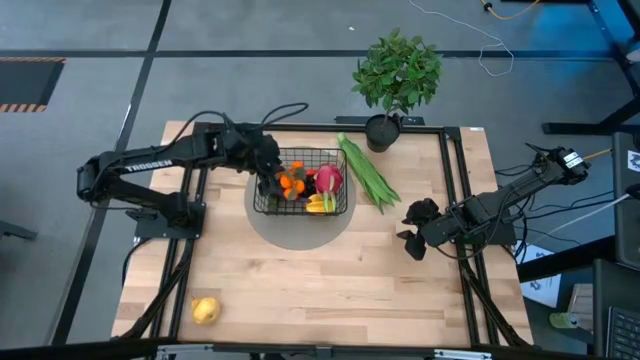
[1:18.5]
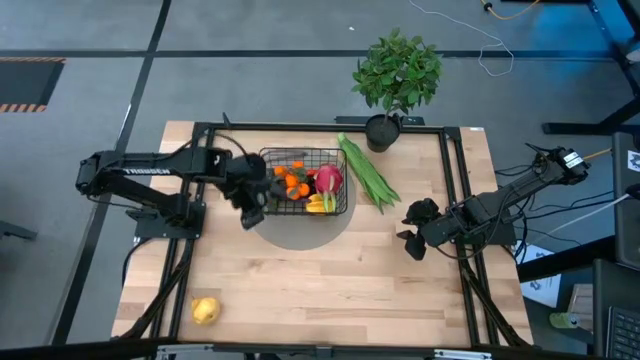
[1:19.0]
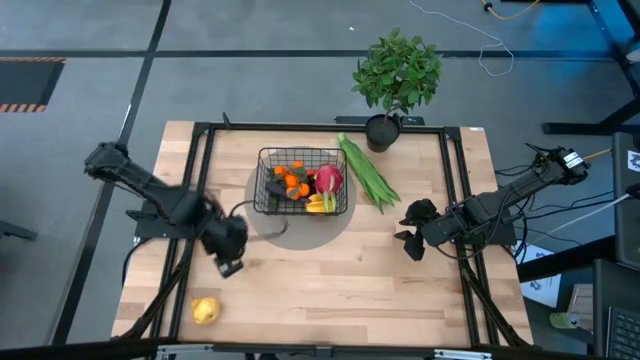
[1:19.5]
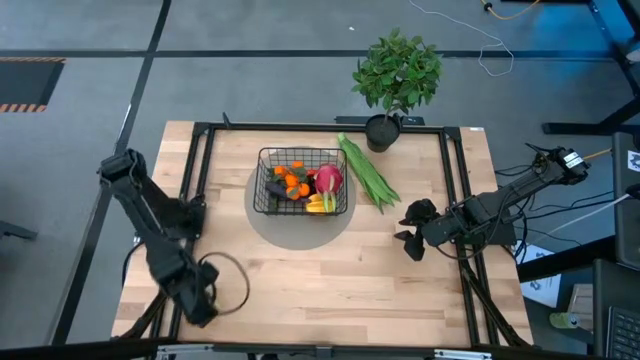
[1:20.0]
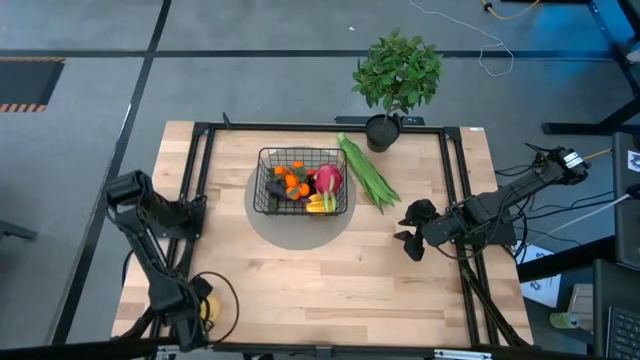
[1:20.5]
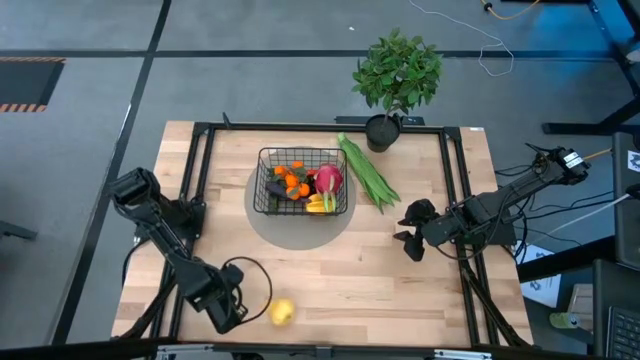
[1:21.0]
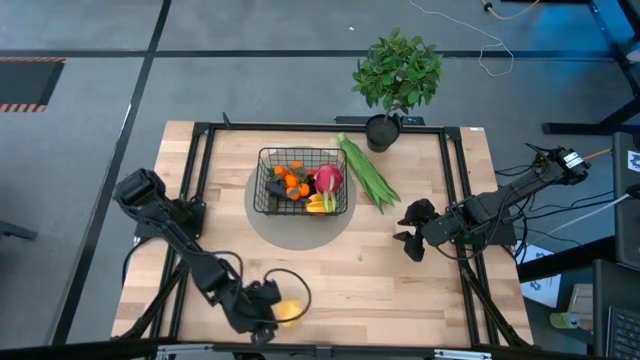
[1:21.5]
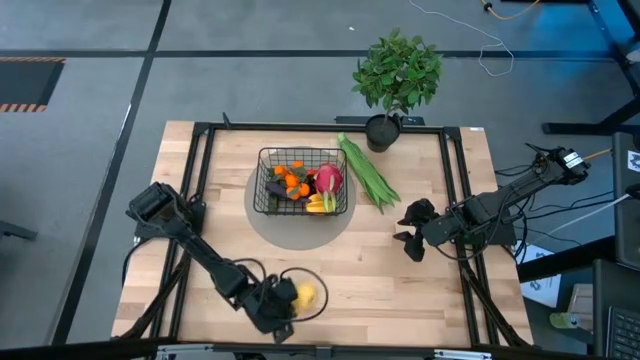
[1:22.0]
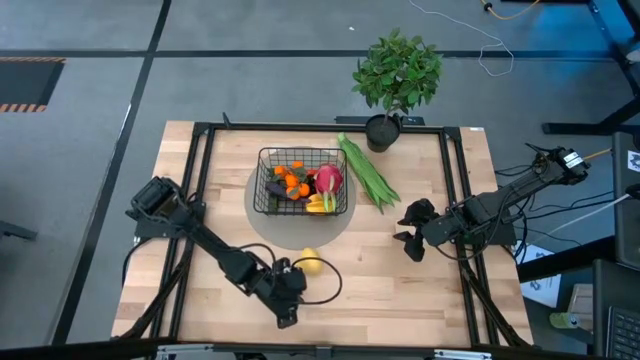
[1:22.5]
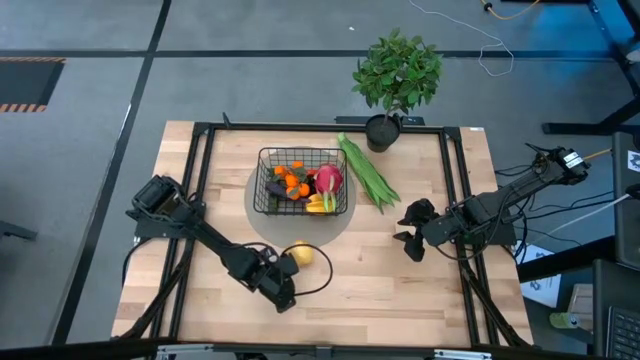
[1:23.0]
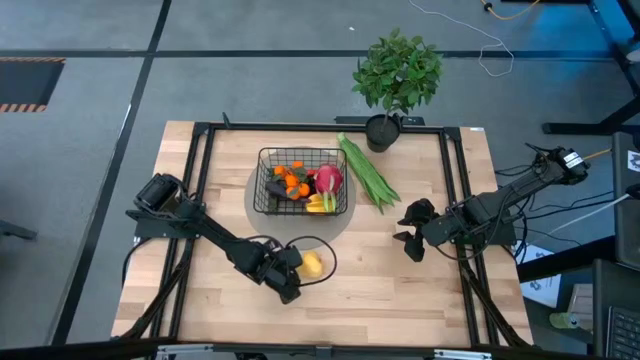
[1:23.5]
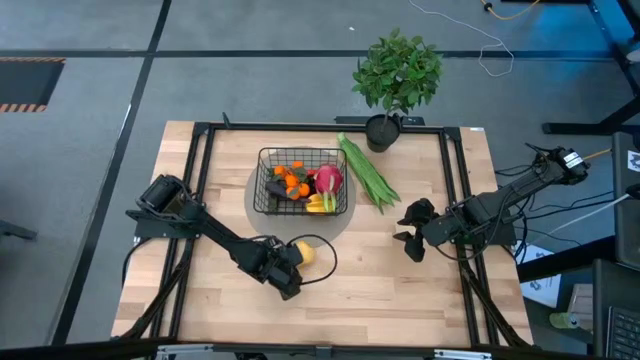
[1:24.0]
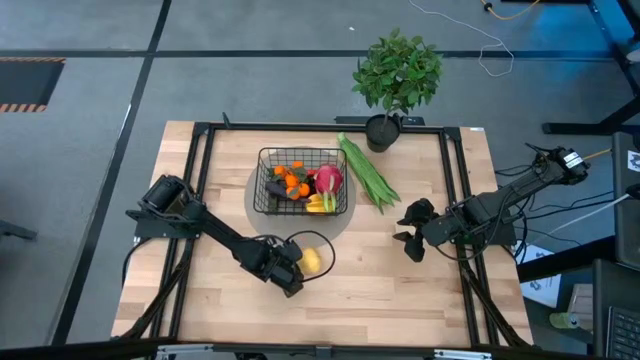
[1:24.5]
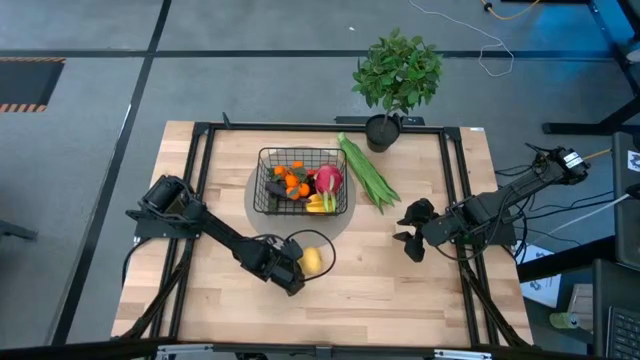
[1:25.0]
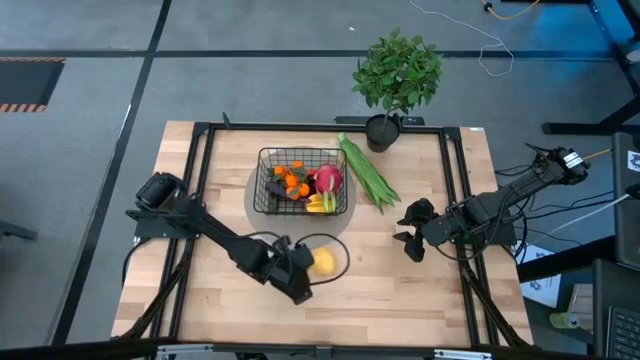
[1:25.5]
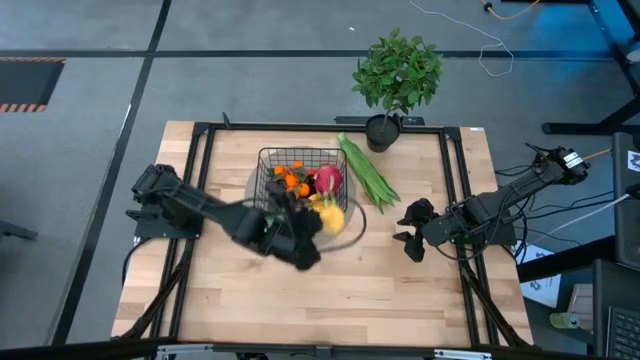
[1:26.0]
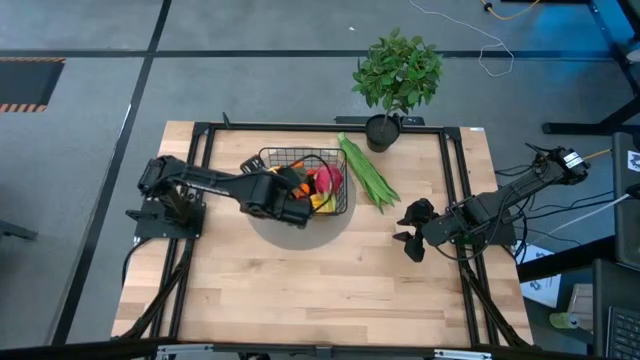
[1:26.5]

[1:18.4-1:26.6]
Task: Build produce basket
Put the yellow pear into the black wire basket

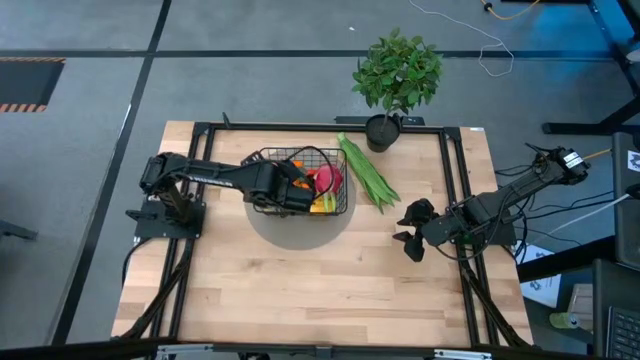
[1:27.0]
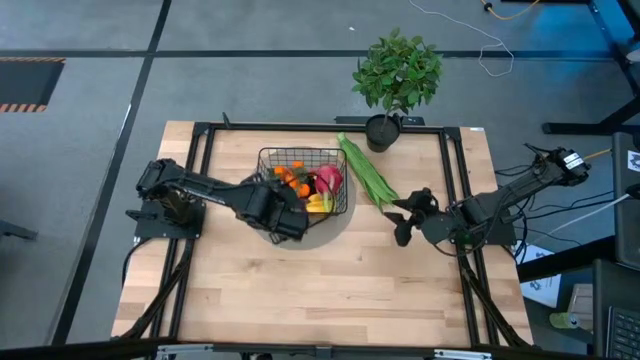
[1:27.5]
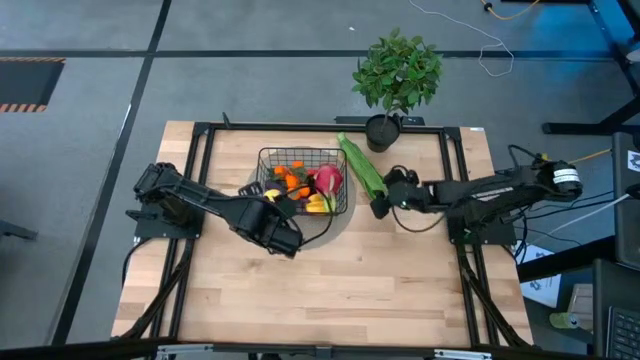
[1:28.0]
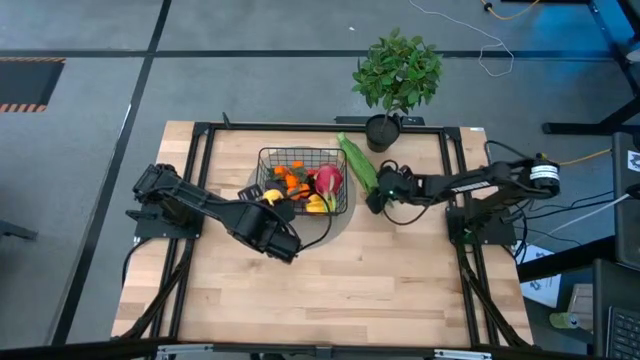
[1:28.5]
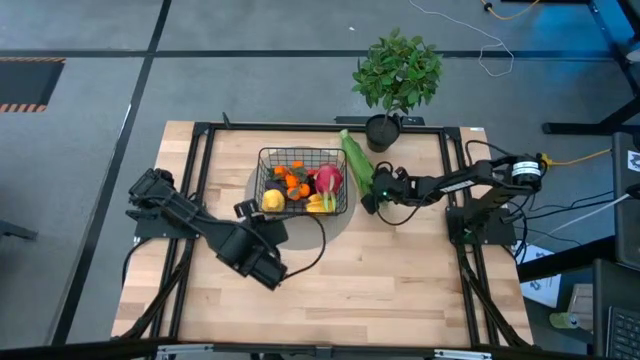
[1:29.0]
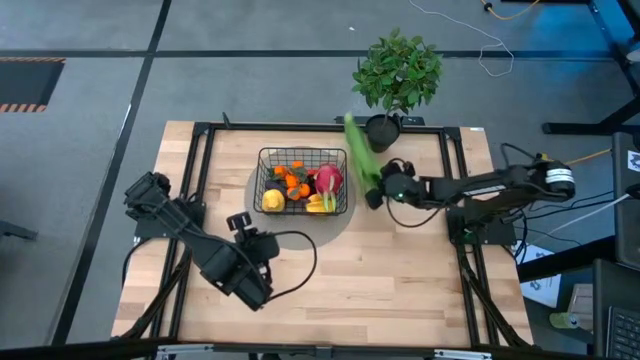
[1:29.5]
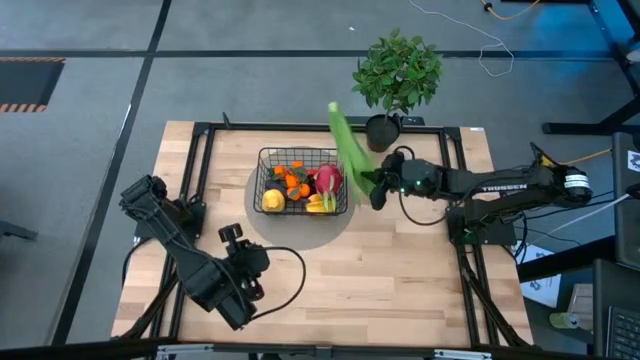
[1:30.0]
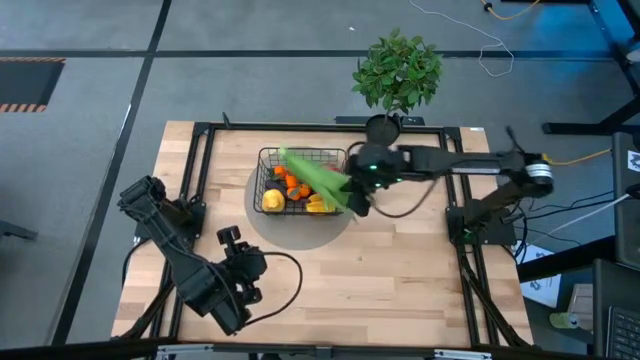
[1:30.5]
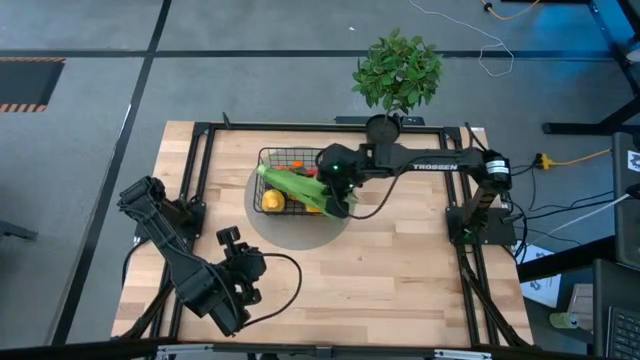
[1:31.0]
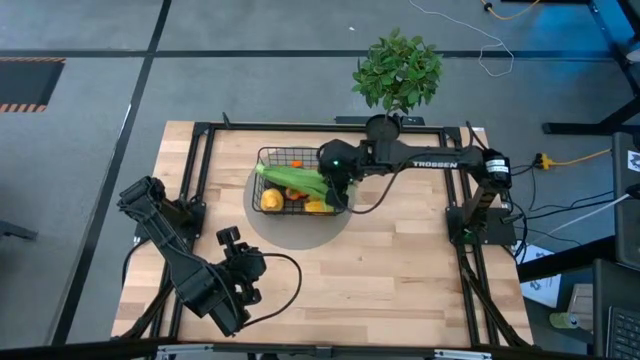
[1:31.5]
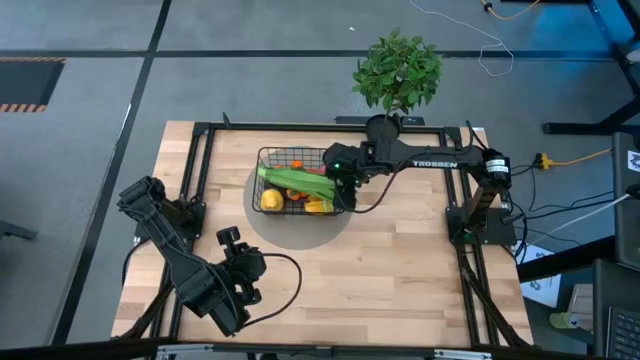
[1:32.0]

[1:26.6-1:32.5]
Put the green leaf lettuce into the black wire basket

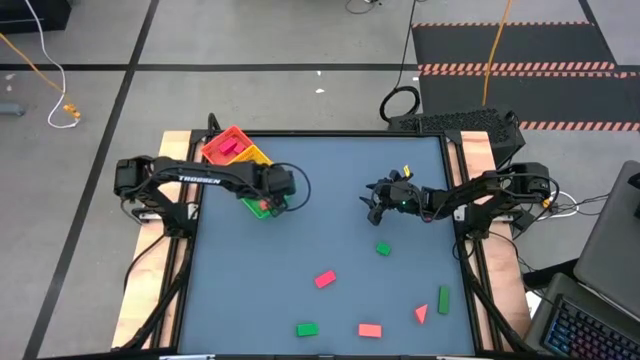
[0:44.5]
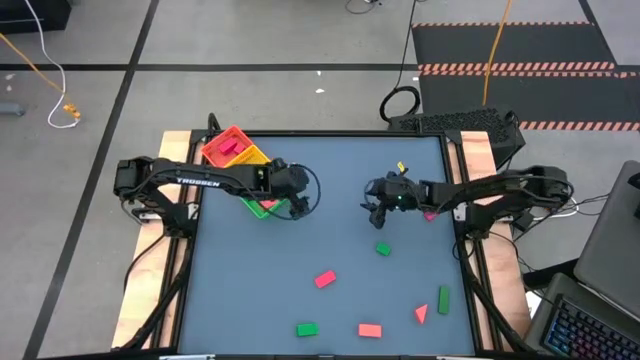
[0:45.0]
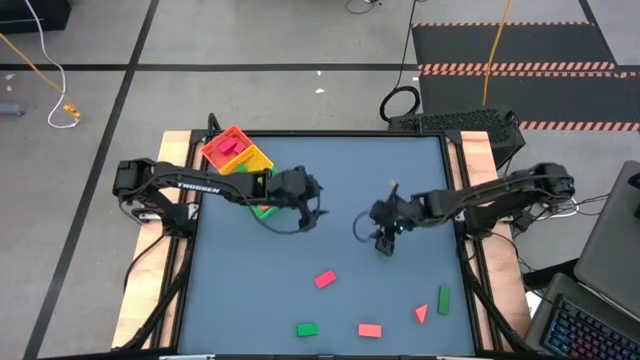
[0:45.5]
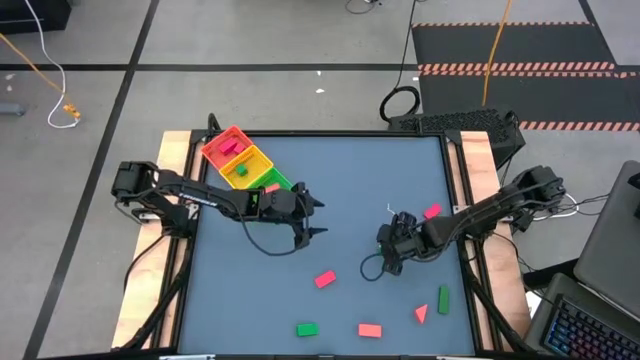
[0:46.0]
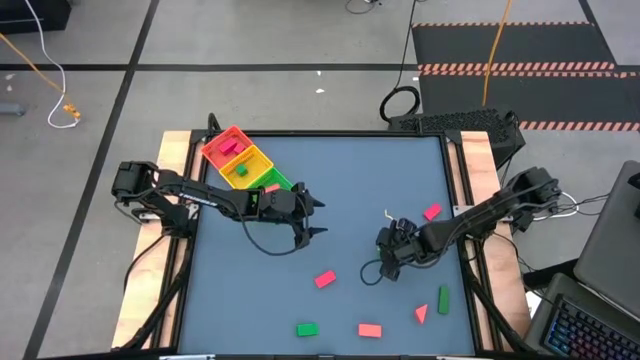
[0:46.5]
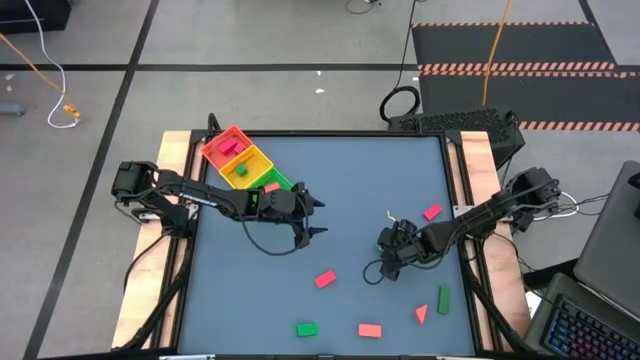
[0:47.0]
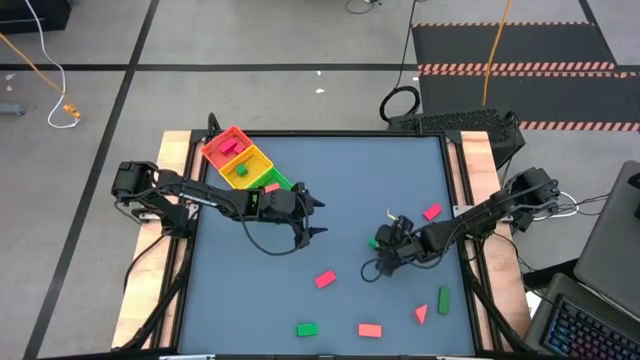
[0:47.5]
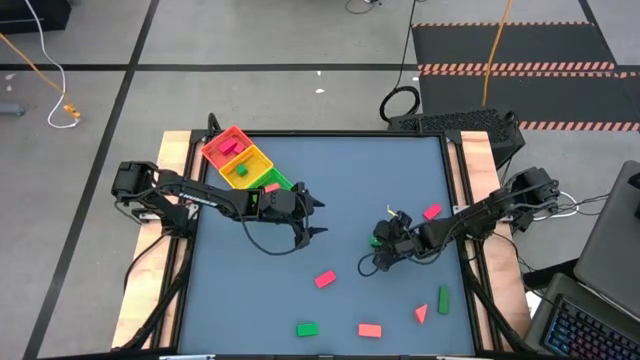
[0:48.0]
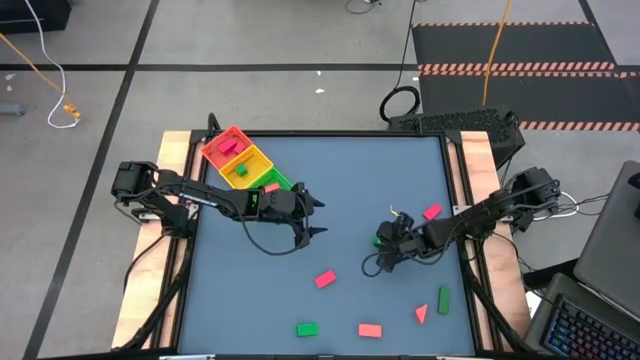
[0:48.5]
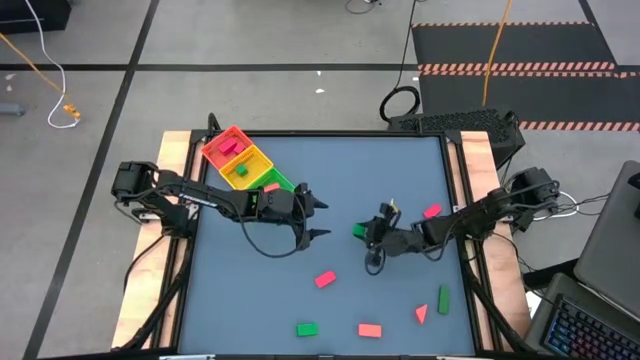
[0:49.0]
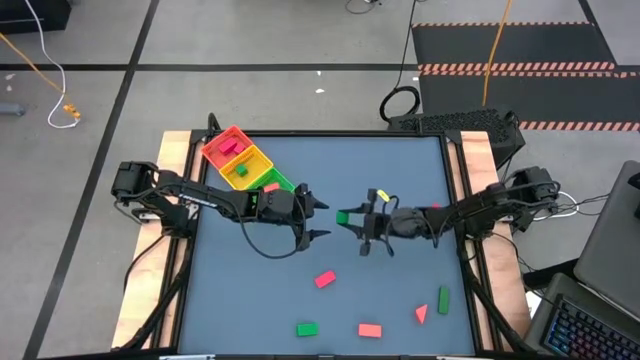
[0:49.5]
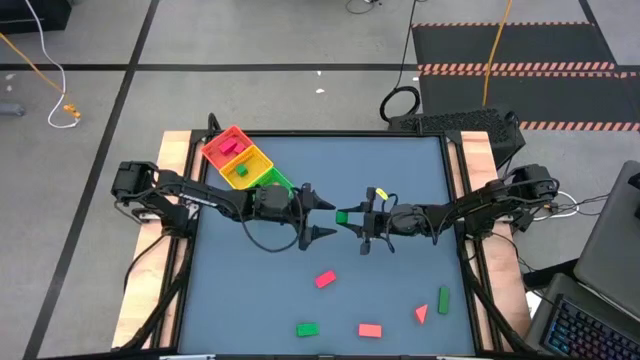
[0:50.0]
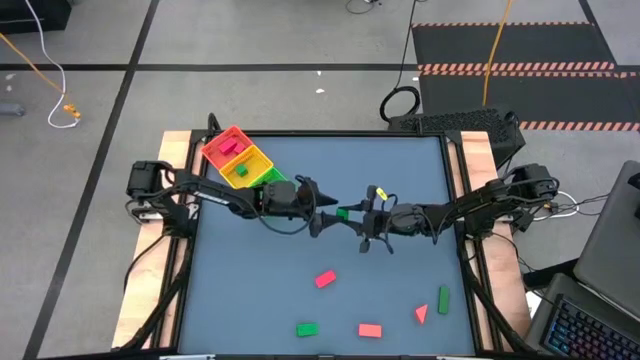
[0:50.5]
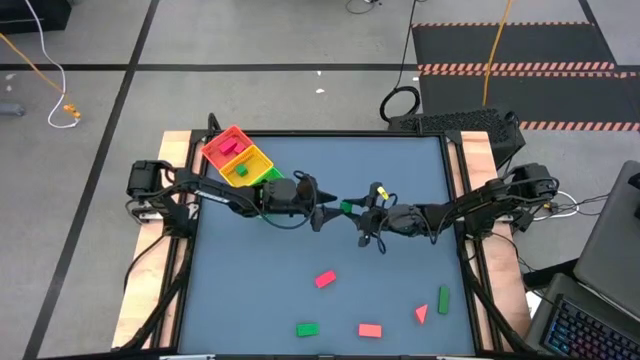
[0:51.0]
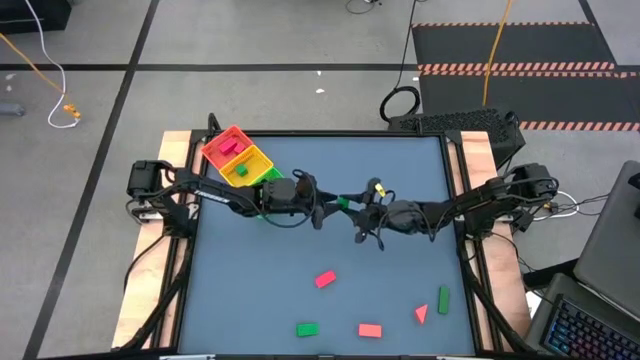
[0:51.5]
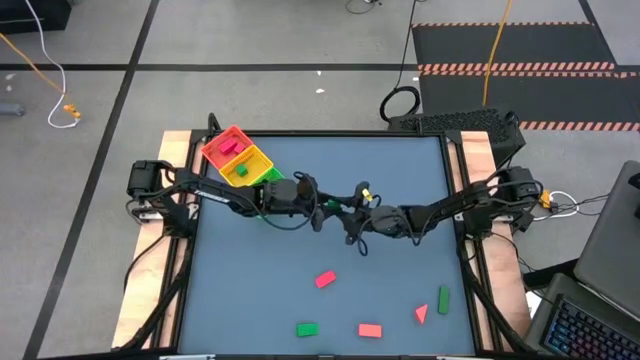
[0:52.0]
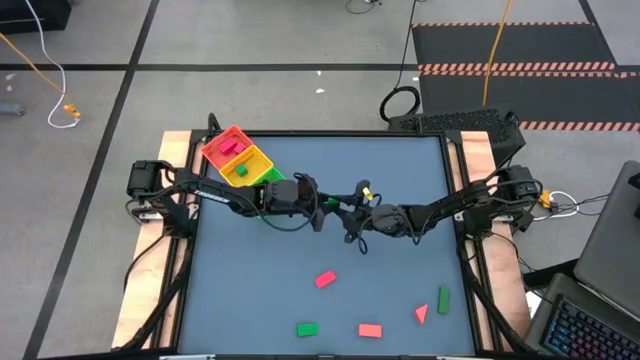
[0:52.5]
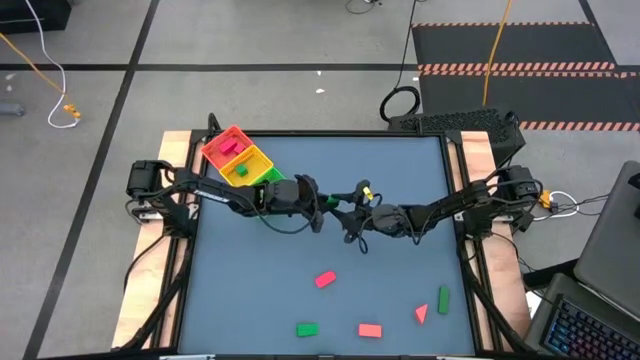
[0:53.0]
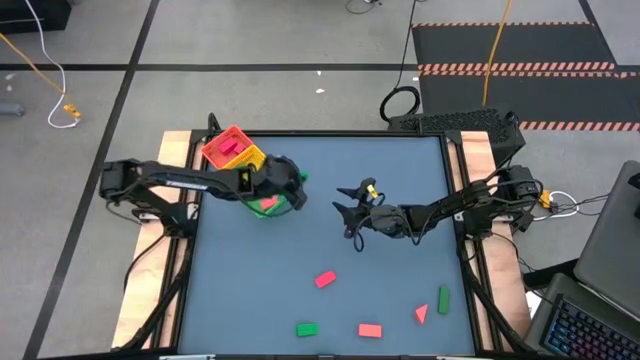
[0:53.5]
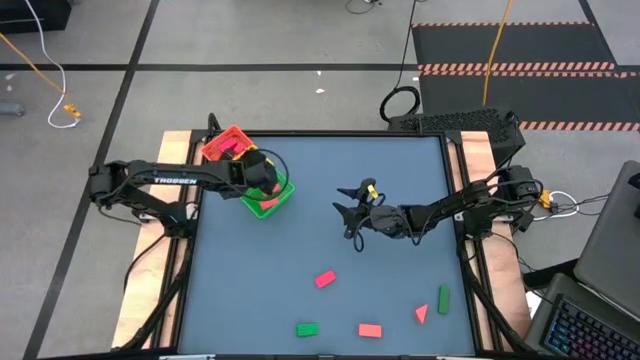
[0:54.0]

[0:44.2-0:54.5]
Task: Sort & place blocks by color
Put the green block into the yellow basket
